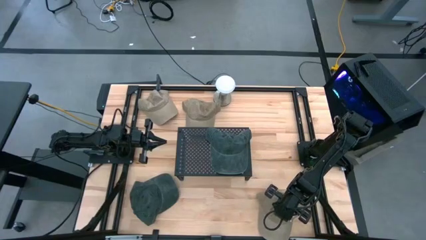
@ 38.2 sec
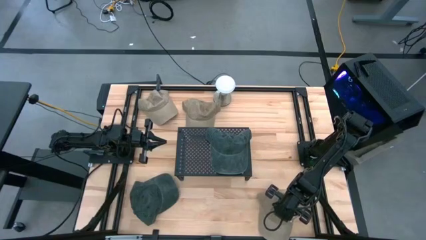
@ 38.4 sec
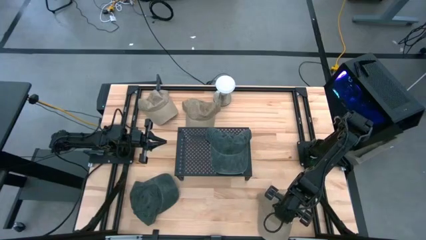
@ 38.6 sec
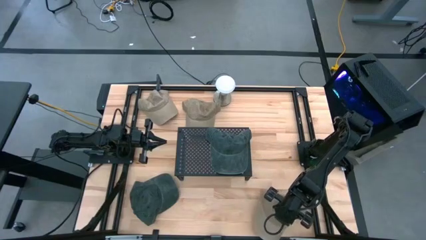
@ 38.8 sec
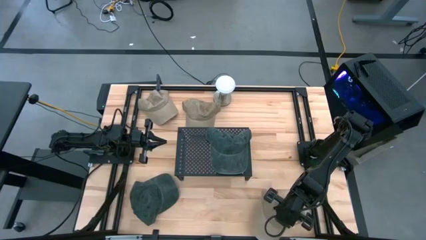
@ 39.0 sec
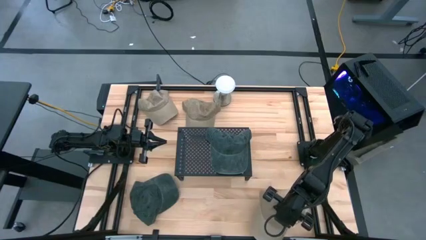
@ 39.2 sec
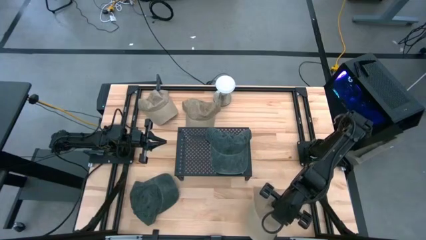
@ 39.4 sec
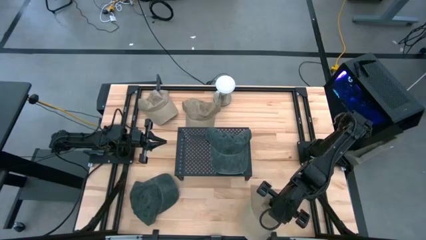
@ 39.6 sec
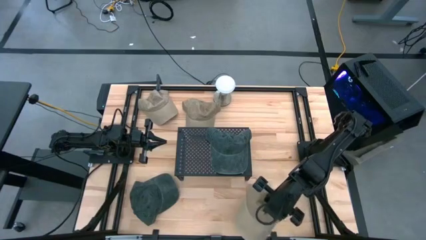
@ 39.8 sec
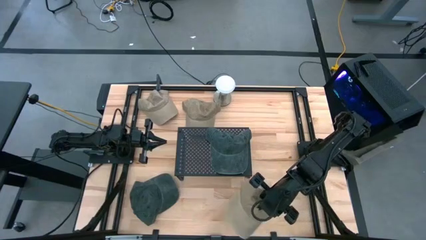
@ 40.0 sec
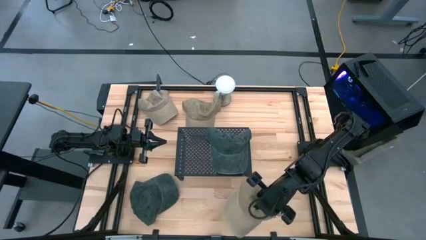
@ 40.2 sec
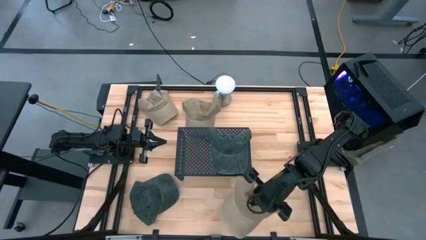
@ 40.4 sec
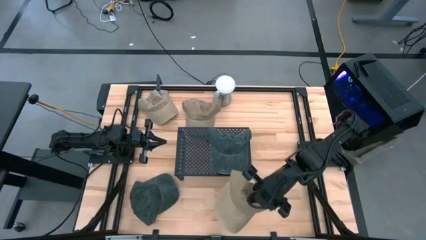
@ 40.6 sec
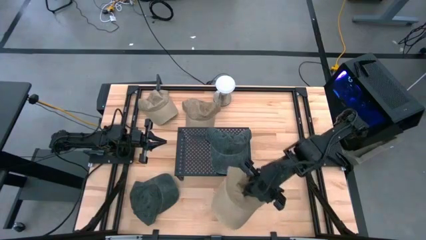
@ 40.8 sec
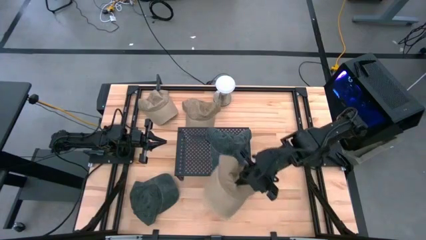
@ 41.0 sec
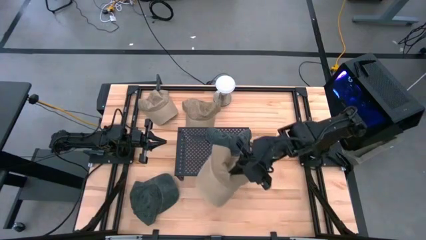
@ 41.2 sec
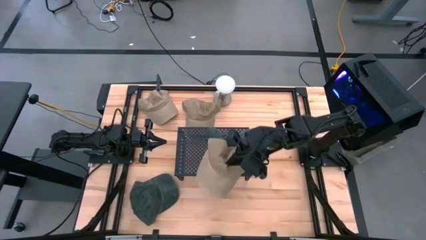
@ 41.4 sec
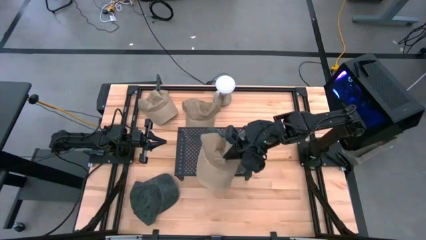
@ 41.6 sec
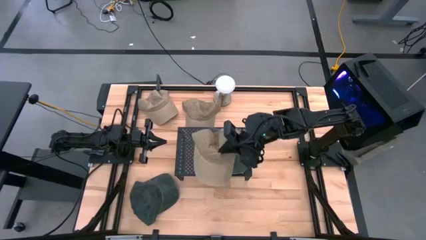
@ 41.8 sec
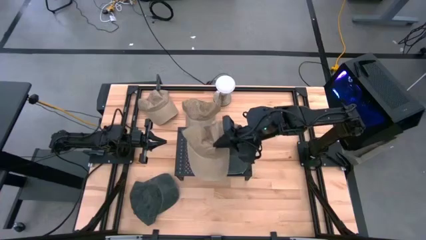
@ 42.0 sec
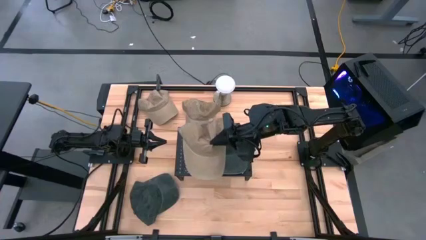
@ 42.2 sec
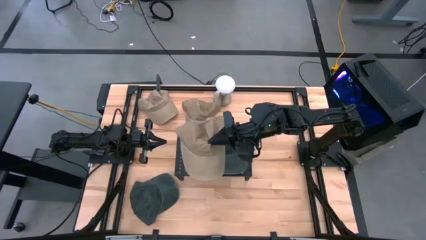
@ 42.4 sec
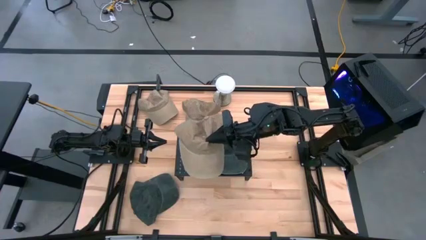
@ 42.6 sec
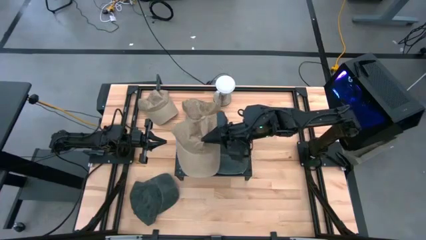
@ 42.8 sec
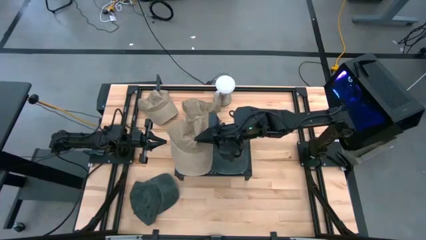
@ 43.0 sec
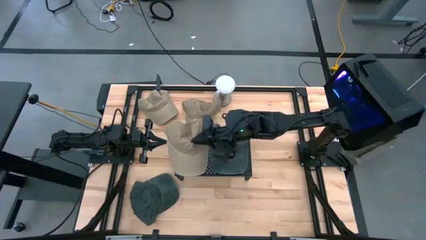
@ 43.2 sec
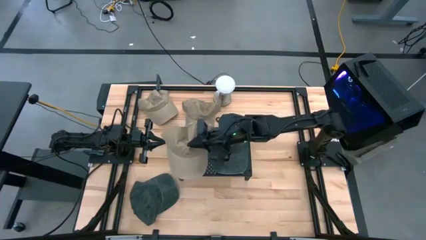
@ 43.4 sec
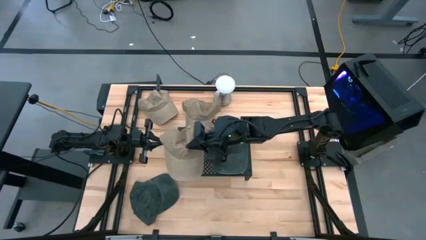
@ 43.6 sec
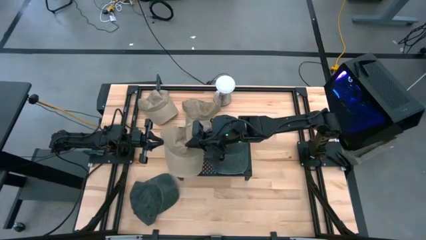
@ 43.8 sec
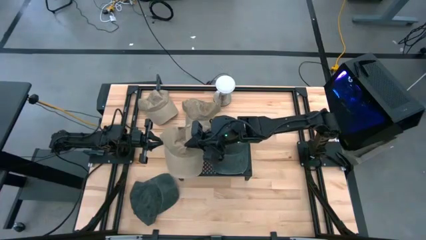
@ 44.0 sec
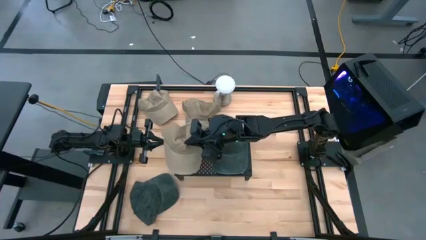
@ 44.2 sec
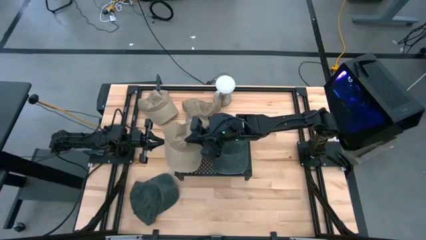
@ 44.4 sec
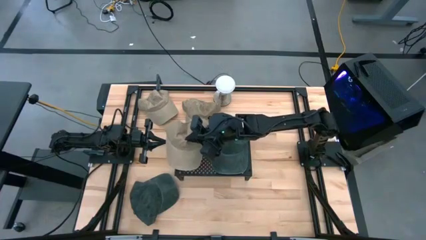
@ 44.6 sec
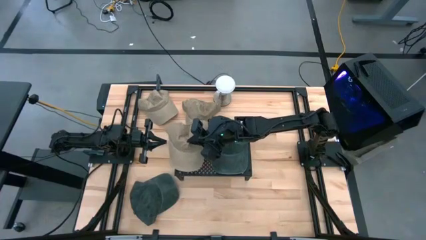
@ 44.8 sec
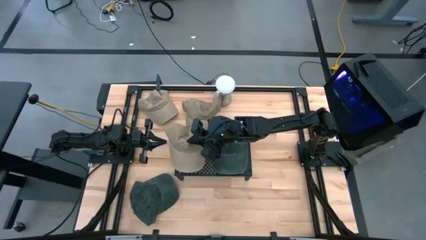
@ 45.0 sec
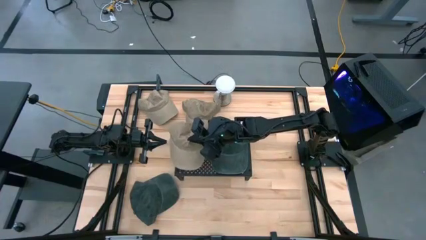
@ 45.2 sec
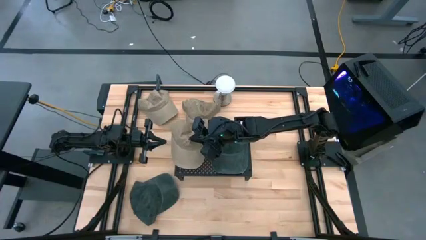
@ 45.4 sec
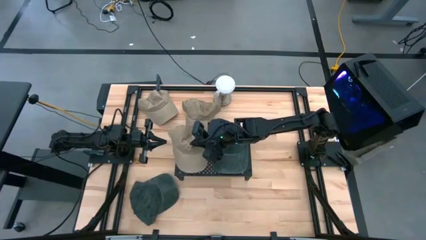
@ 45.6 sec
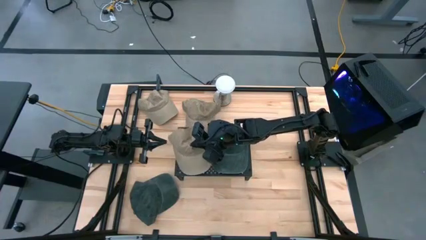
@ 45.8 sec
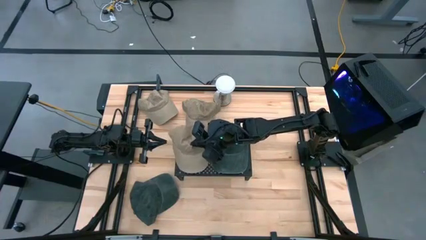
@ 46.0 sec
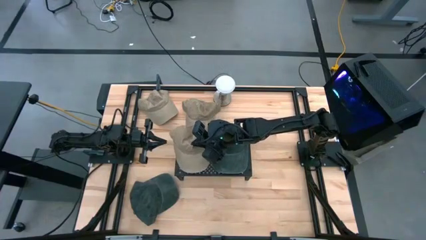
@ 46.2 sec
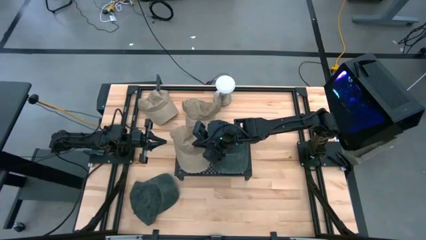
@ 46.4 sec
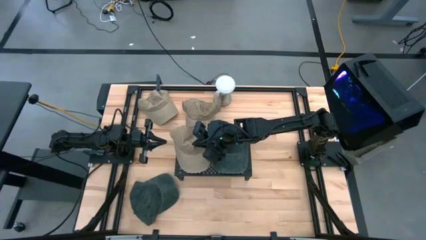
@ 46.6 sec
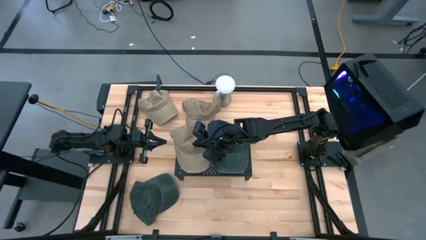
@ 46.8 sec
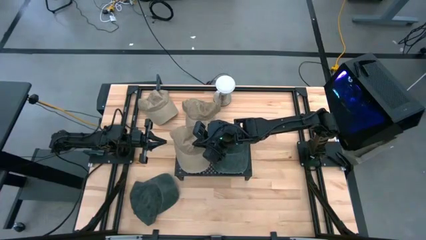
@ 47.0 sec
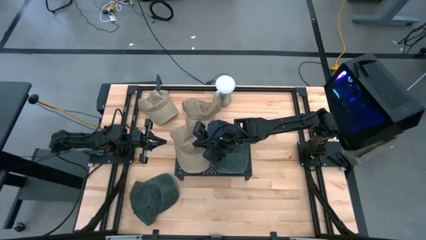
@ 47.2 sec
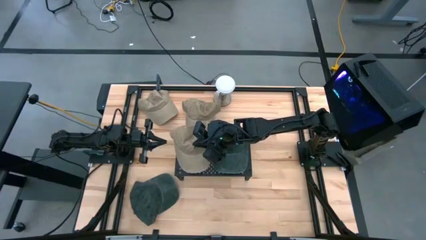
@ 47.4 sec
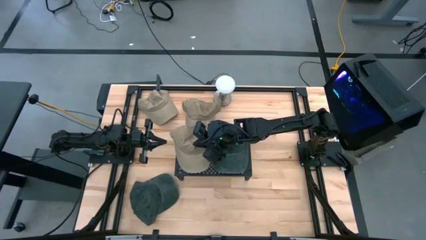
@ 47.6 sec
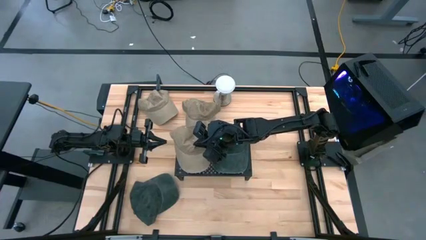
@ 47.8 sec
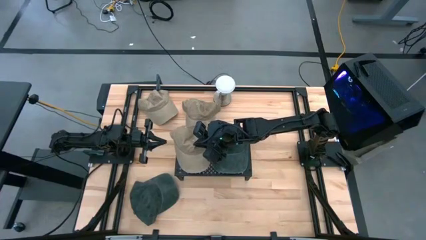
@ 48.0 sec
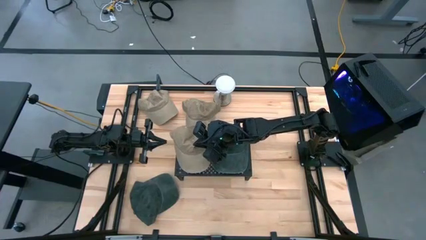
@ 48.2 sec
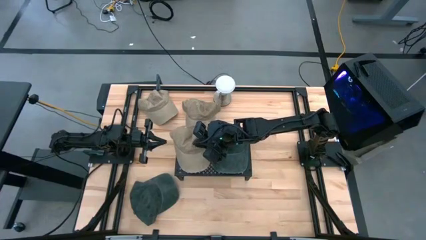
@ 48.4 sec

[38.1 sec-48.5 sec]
Task: Pick & Place hat
Put the bottom brown cap on the shelf
